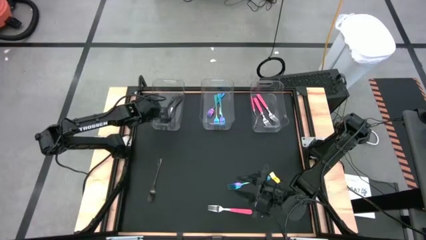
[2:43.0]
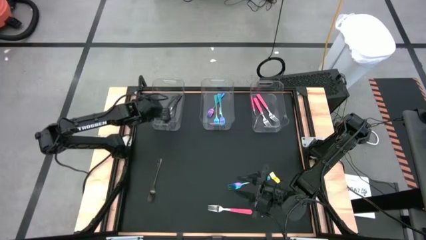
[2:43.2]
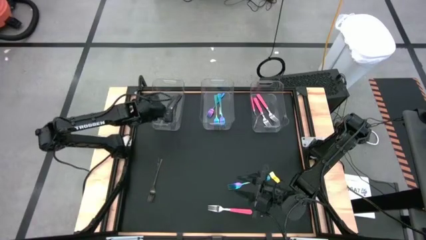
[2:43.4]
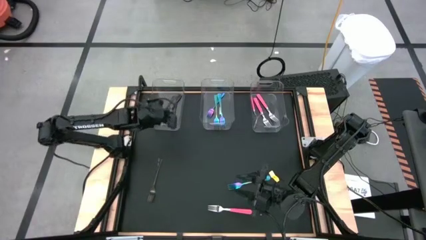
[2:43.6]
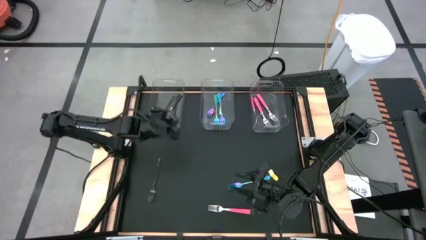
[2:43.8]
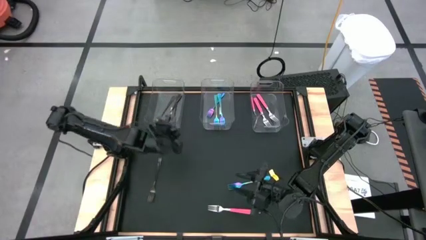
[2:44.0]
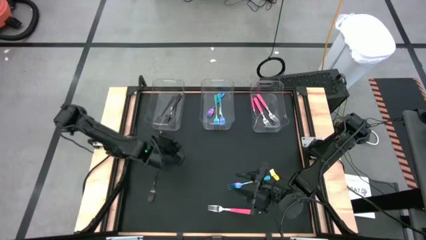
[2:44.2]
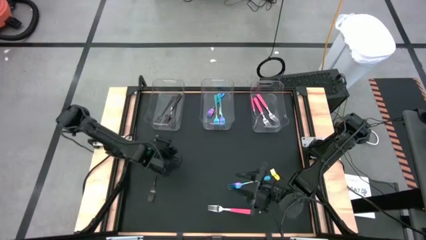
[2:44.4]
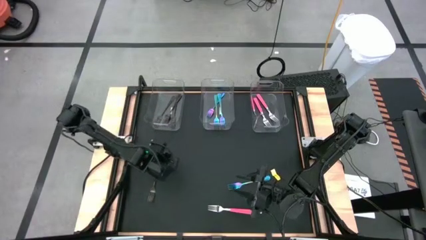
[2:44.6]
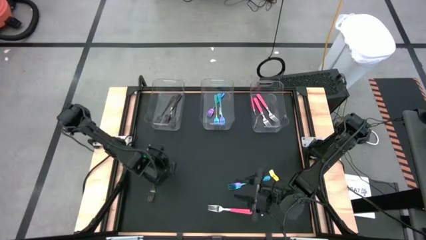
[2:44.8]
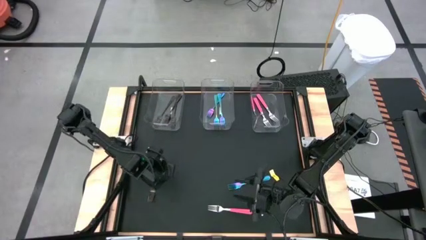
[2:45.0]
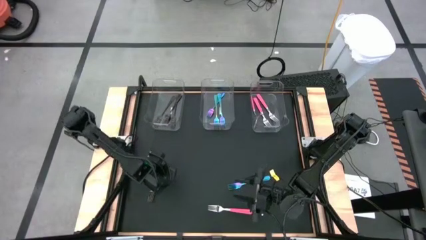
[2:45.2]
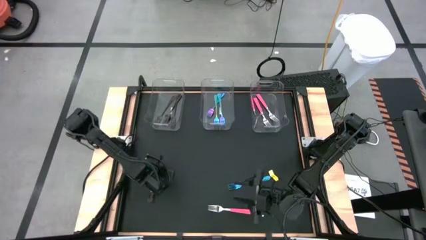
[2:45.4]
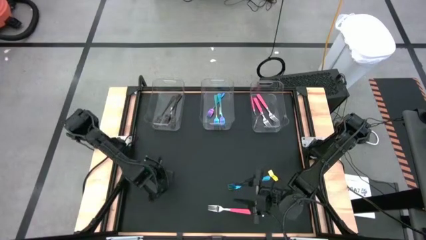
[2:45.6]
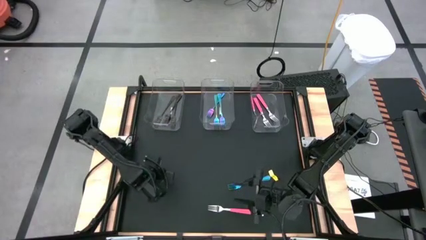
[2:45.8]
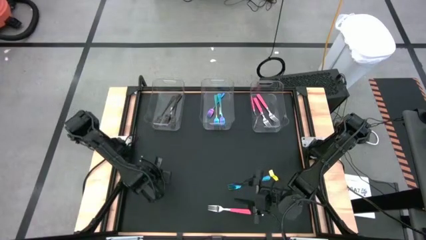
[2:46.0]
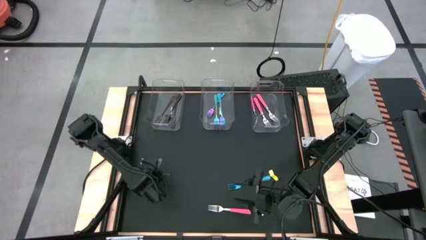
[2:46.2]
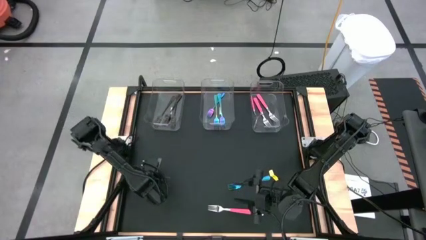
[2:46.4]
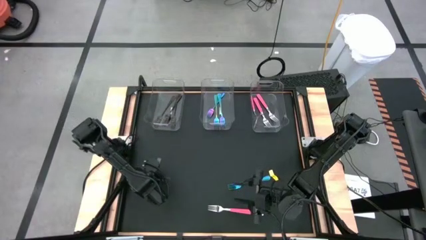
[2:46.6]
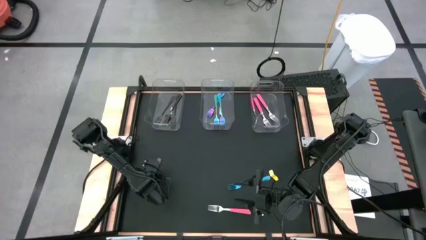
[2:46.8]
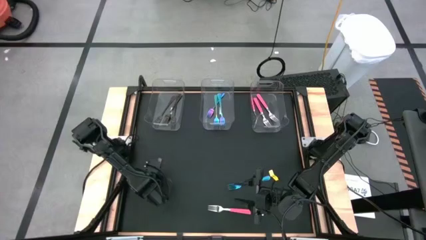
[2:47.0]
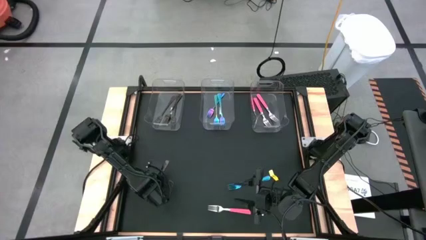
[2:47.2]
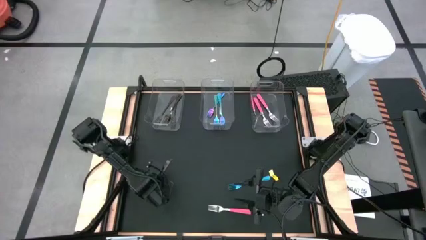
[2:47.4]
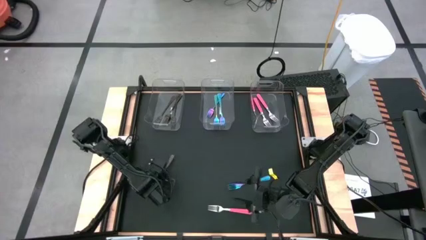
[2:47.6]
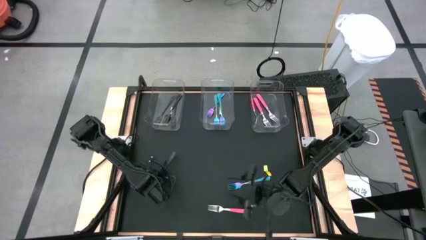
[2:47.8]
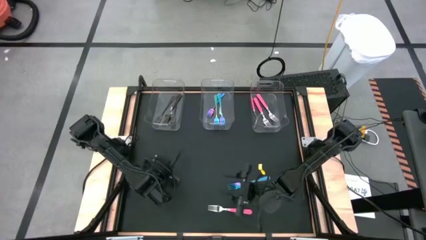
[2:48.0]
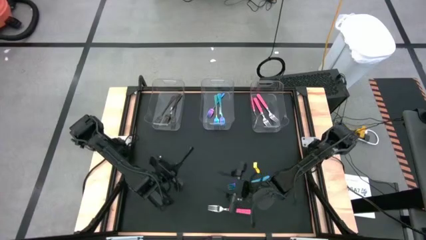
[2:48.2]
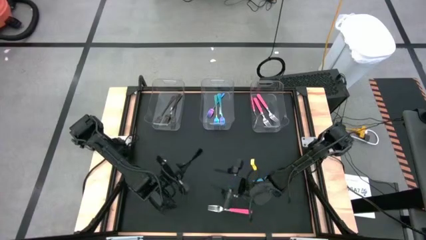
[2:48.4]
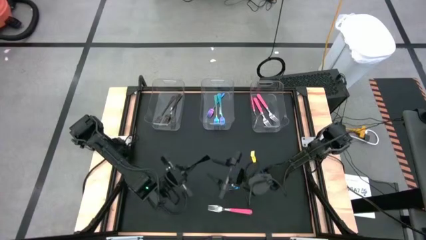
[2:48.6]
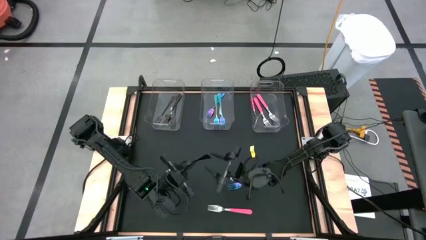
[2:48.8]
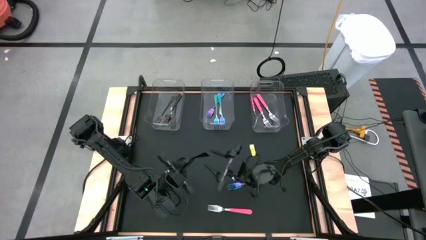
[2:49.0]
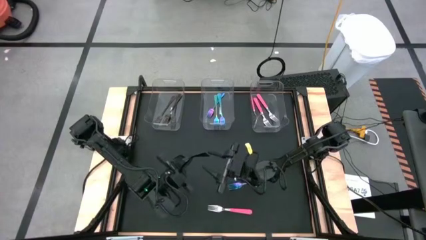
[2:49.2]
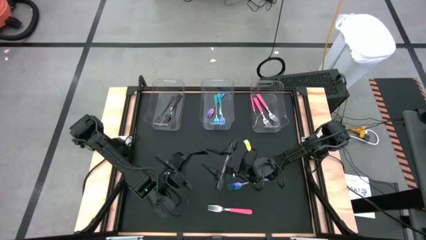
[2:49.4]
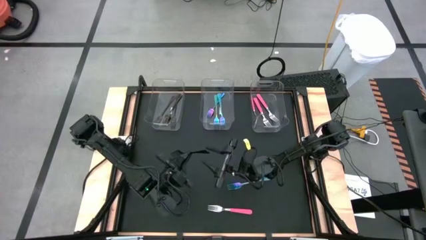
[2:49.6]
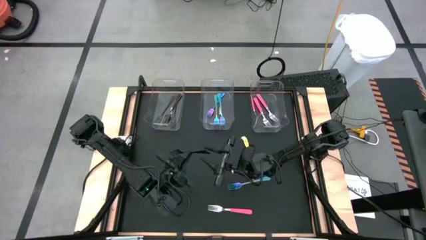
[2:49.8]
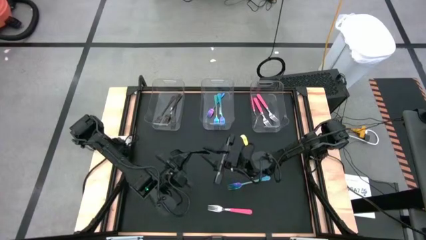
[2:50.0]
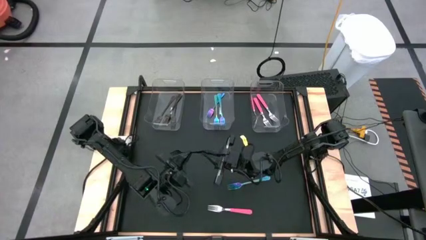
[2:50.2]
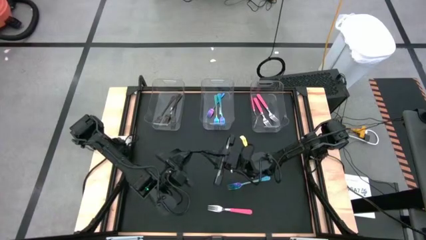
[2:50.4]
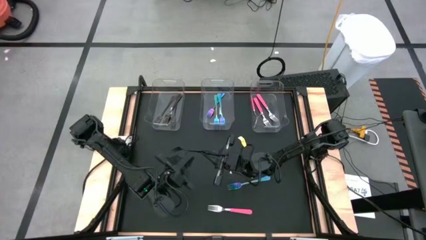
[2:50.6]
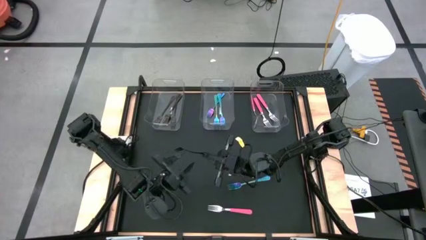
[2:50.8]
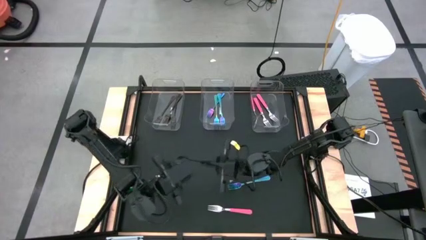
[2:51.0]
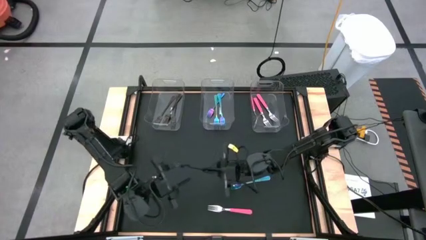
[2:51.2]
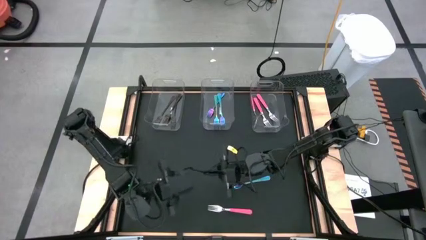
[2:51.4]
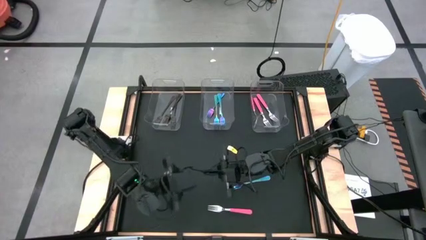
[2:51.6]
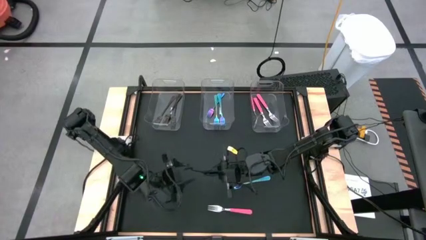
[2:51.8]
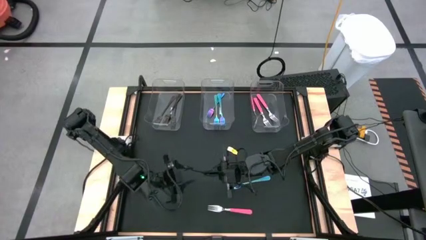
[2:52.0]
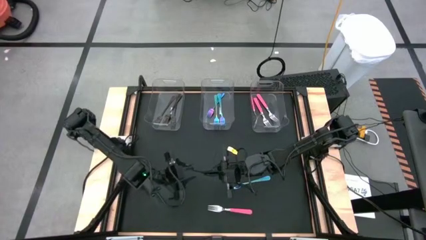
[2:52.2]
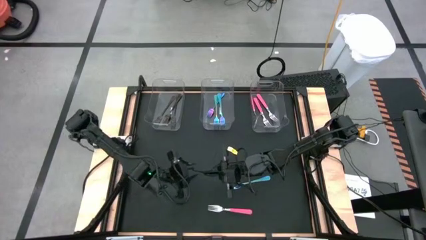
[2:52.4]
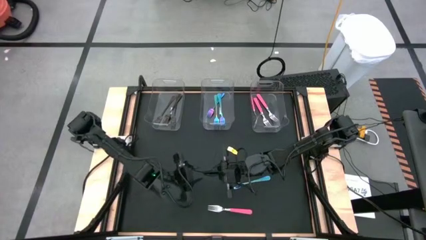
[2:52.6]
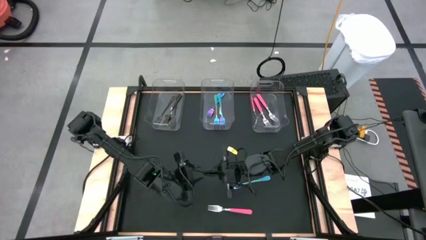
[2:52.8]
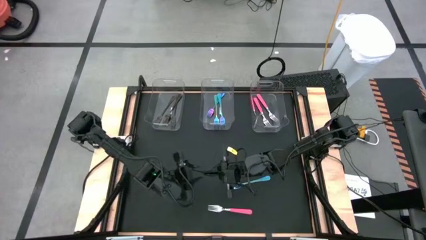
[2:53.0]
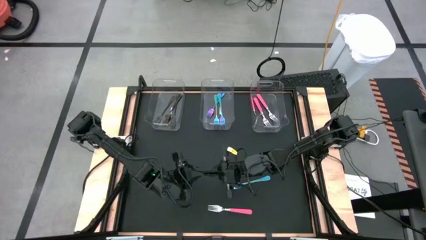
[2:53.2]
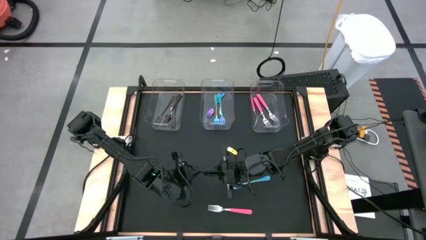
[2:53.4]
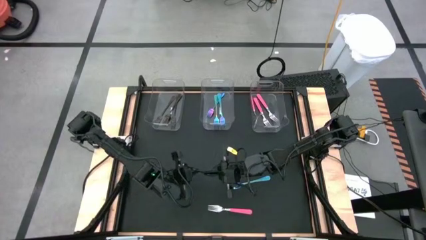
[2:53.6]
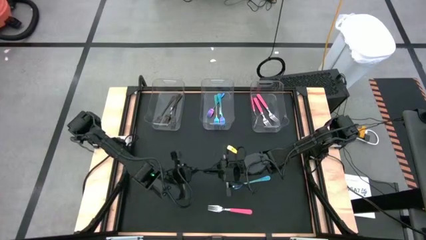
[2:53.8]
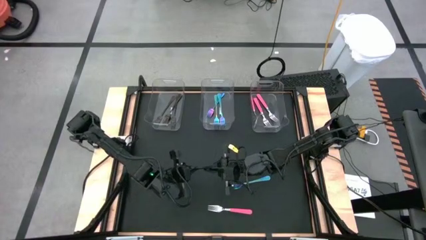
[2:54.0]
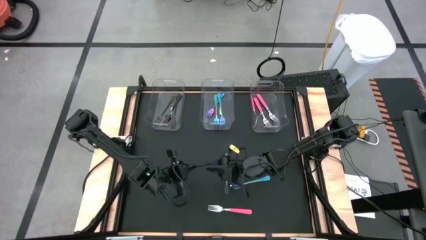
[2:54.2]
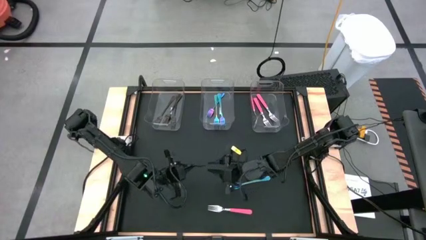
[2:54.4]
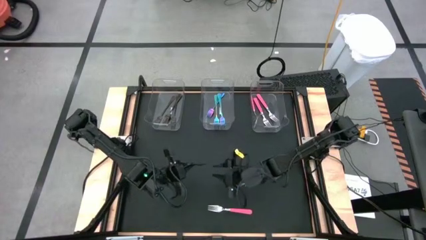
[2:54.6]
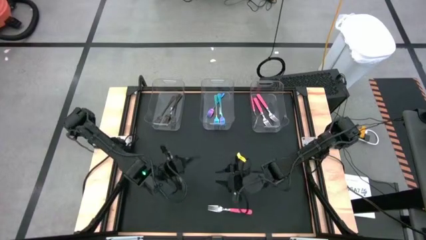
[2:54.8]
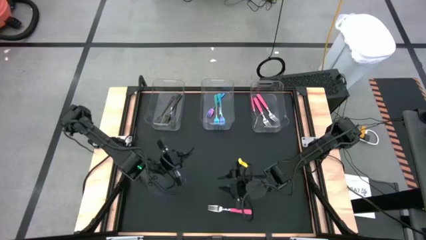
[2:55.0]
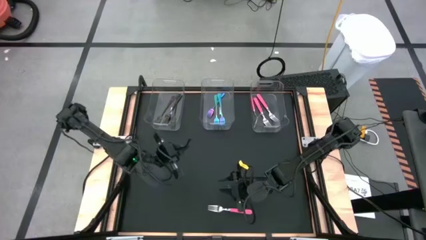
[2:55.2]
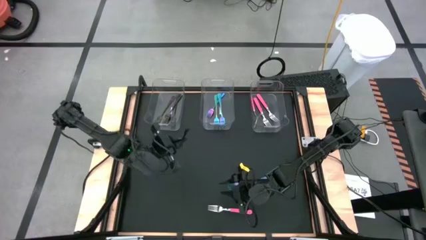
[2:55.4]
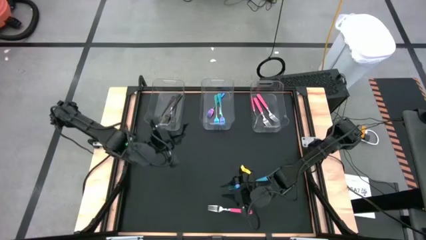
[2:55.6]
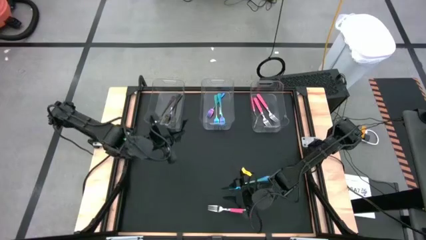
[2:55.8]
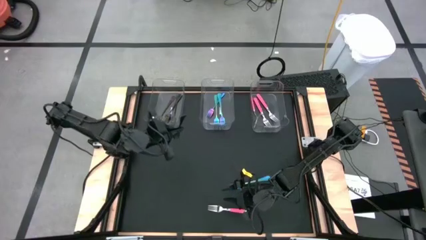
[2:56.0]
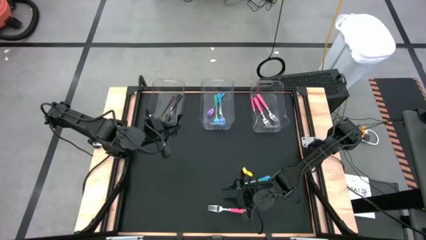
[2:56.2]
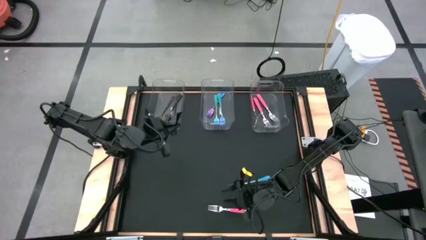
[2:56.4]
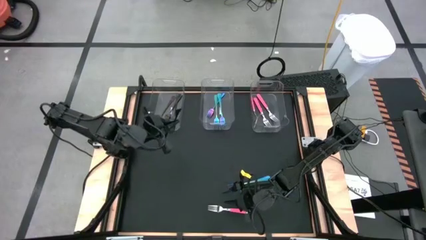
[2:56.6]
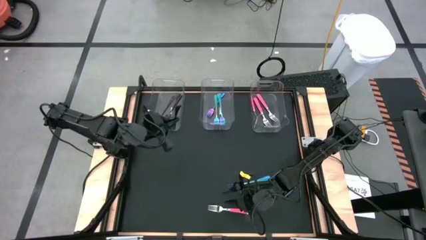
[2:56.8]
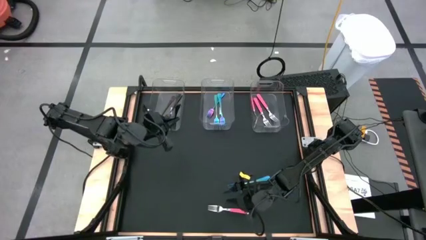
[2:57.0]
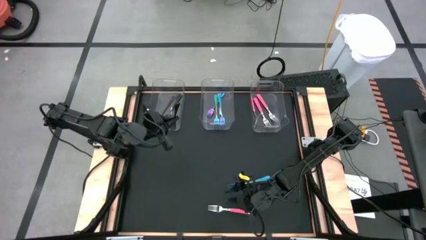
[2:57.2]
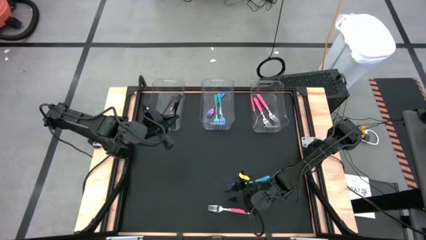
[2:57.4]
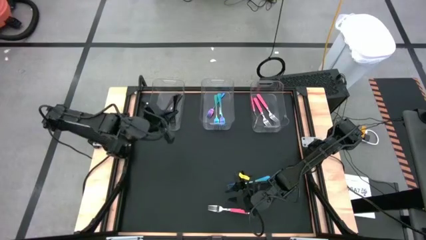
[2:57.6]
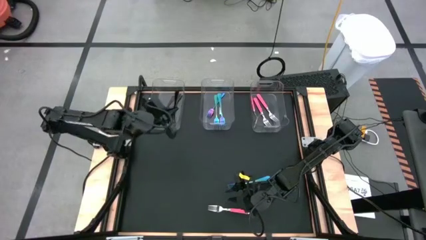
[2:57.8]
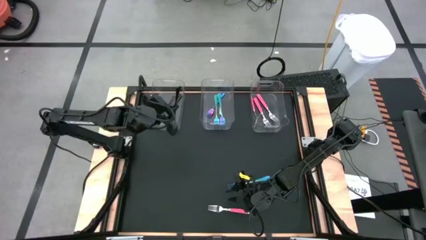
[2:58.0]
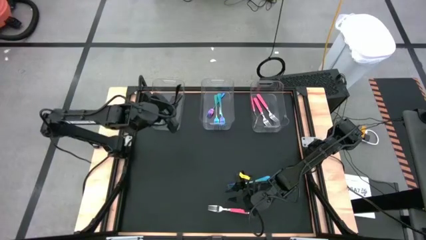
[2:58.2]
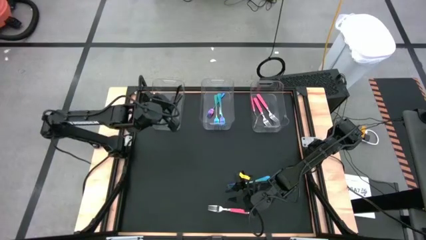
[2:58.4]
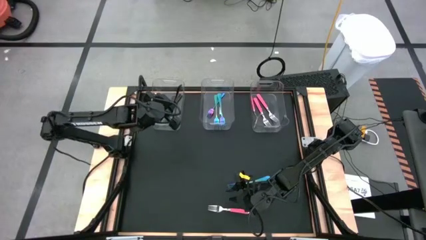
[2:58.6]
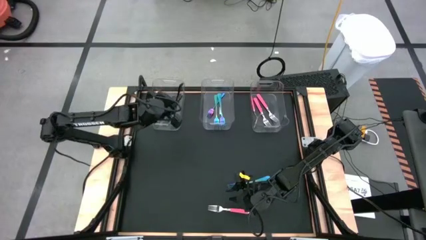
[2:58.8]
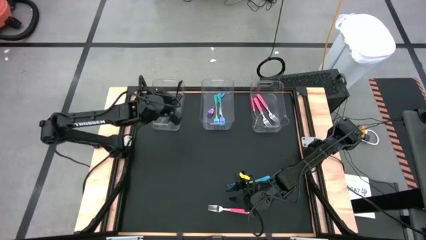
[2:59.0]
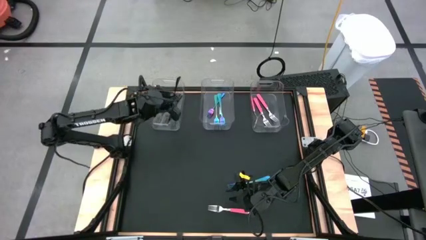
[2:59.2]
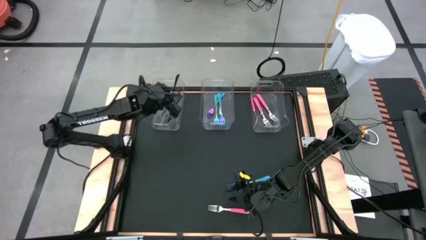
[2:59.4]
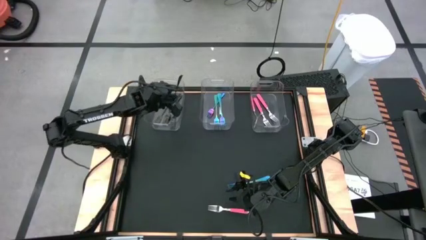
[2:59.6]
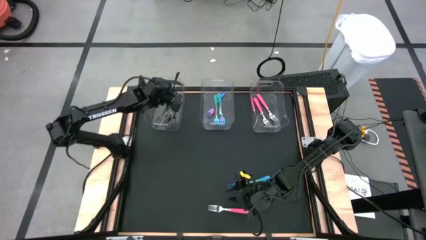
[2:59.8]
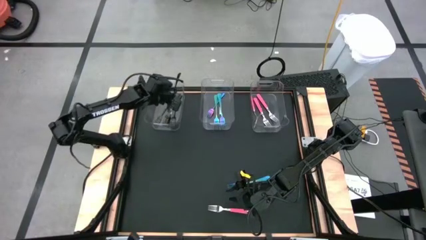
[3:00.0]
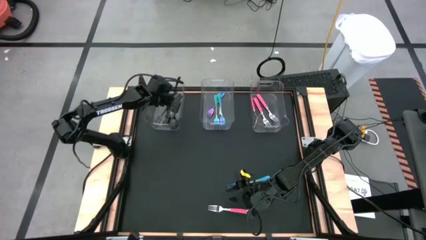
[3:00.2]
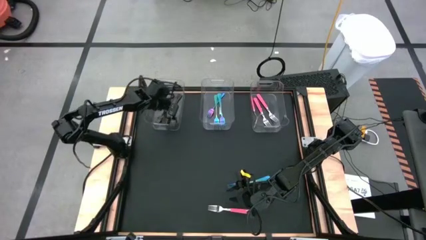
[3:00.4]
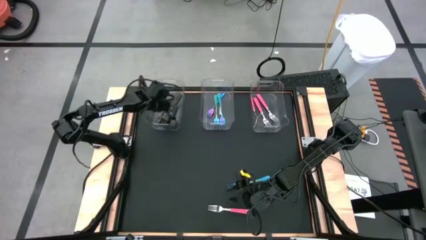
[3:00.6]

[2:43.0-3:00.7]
Task: Sort silverware by color (type)
Put the black fork into the left transparent bin
